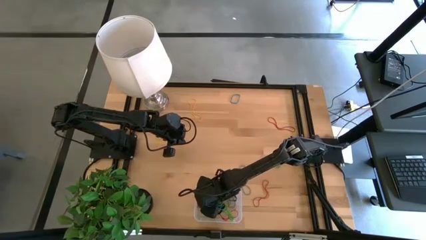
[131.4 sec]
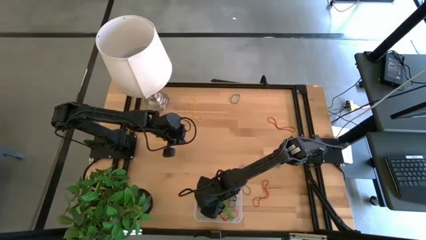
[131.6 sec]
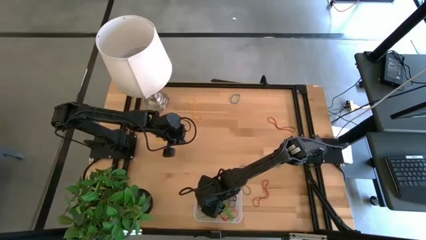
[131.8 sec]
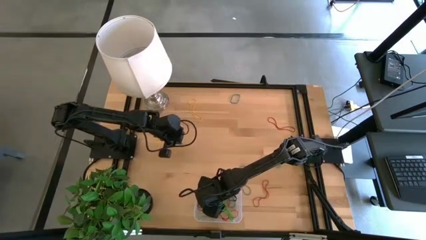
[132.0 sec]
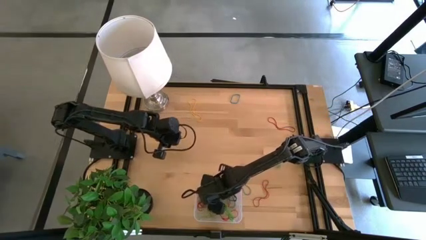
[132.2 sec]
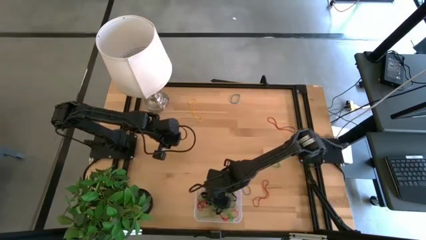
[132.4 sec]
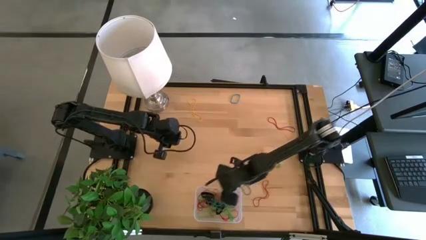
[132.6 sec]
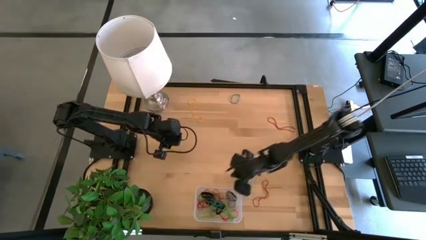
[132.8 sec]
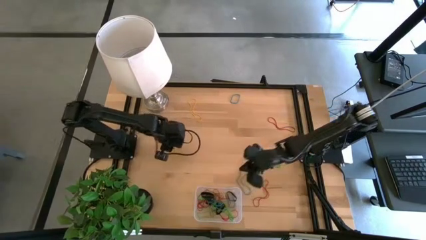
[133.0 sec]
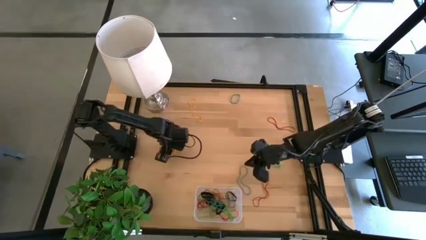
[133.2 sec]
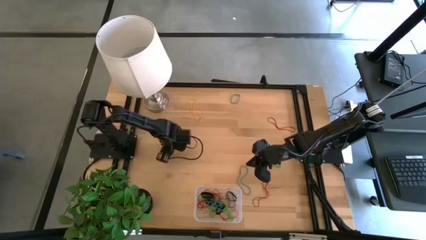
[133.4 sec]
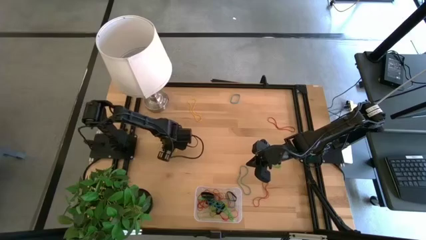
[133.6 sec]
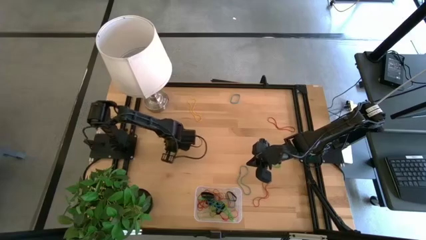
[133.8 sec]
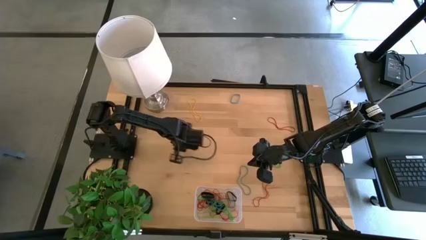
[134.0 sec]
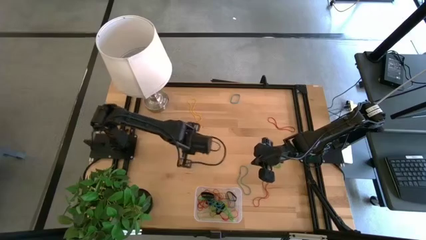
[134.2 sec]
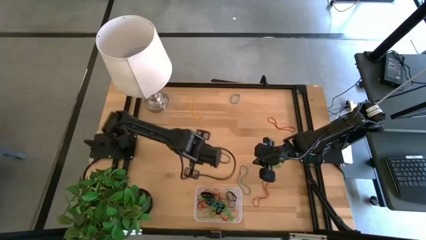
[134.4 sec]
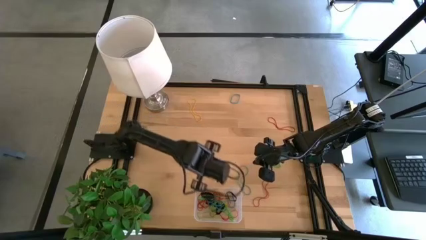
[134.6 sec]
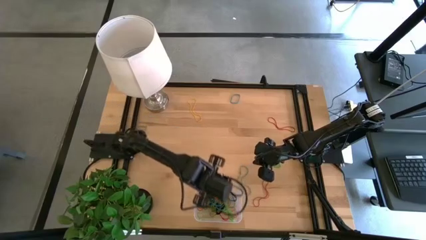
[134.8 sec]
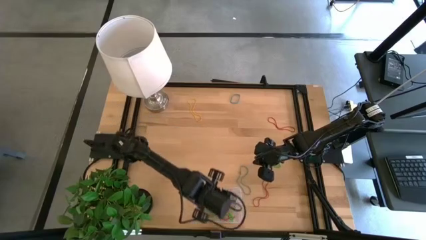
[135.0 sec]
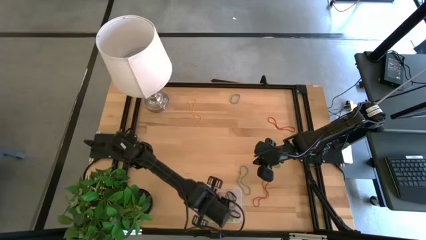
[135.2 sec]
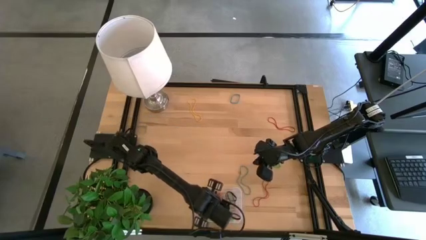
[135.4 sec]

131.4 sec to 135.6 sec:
Task: Pick and place rubber bands into bin
Put the yellow rubber band into the transparent bin

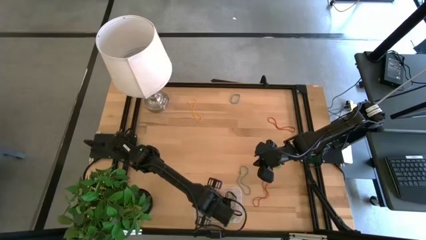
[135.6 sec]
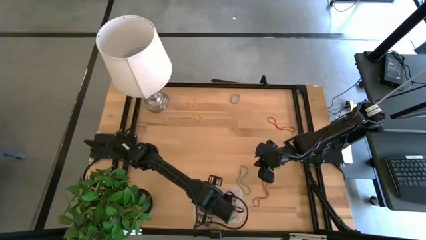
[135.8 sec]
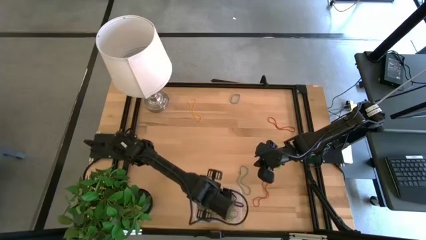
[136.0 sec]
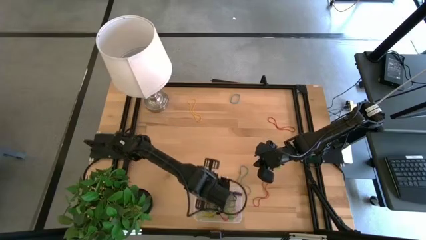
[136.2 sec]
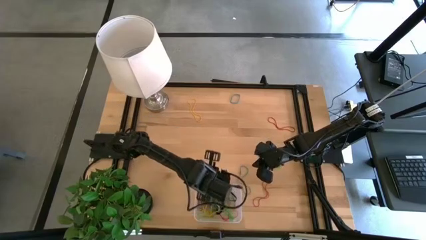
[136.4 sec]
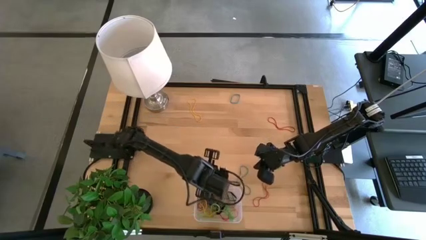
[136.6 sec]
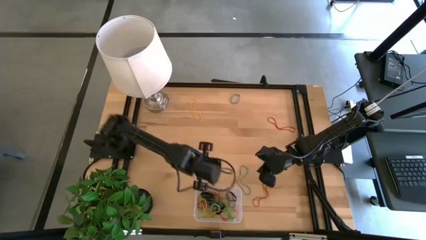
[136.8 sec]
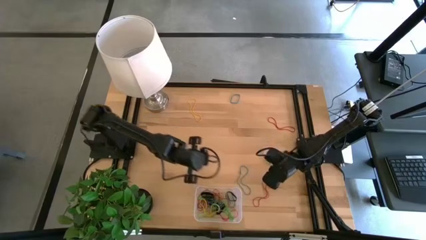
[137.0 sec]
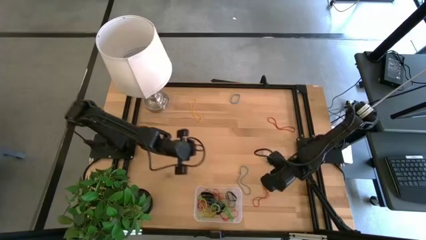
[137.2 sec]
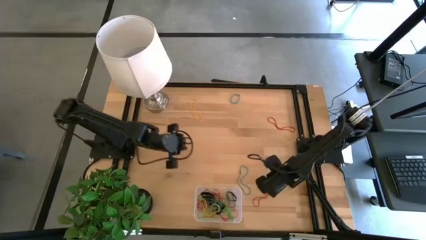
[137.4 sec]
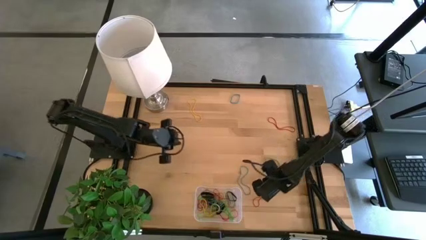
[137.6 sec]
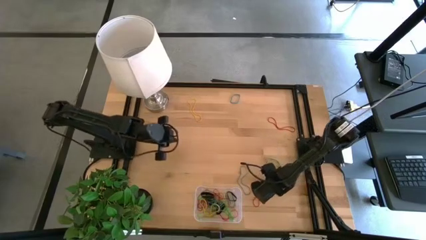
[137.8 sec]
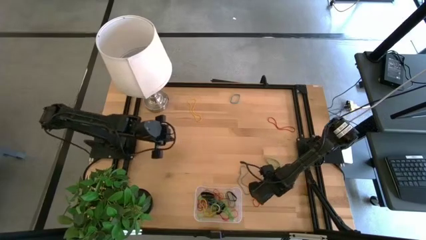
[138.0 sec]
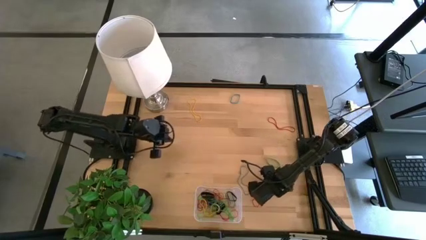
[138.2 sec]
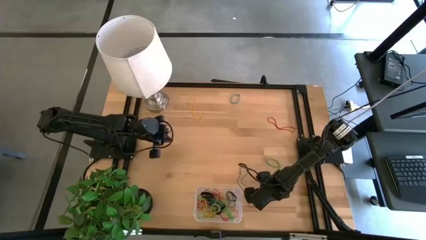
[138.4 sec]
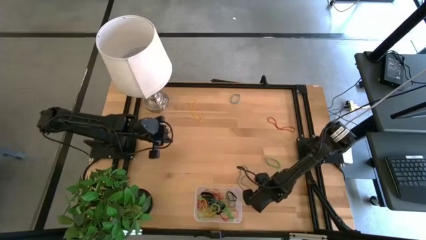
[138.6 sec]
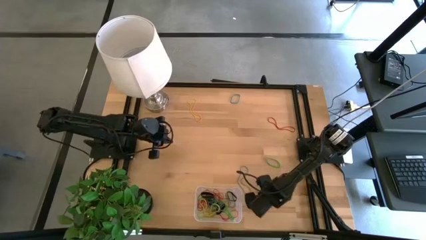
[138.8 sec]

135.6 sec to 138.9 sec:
Put the red rubber band into the transparent bin

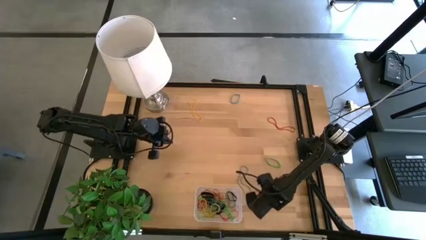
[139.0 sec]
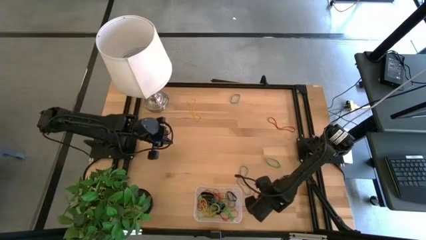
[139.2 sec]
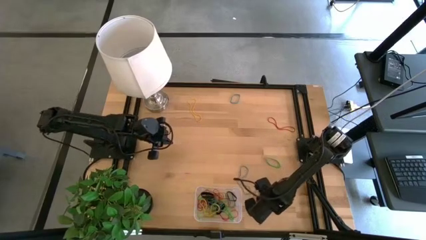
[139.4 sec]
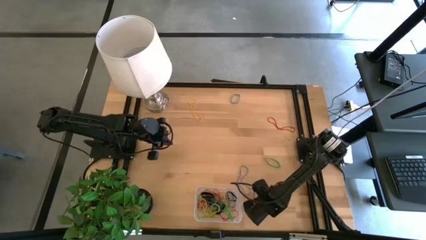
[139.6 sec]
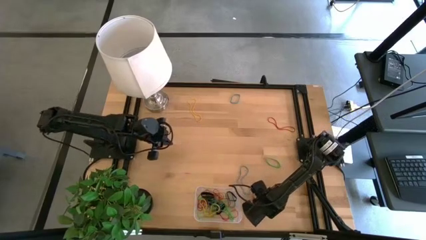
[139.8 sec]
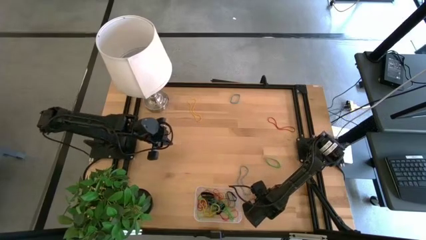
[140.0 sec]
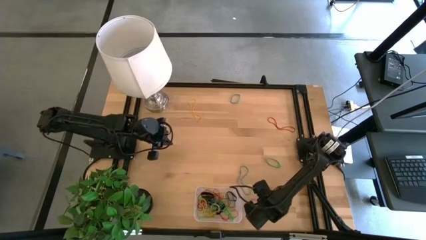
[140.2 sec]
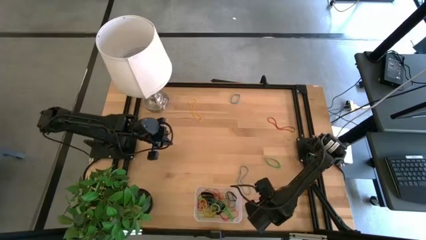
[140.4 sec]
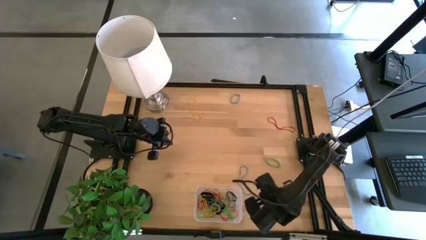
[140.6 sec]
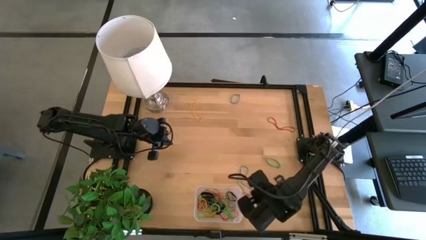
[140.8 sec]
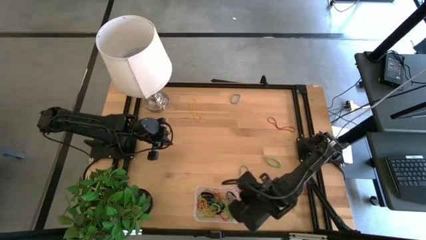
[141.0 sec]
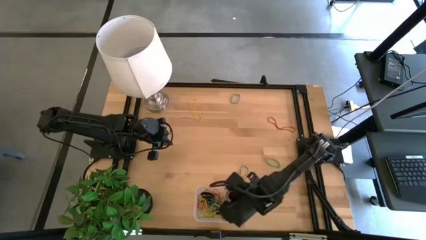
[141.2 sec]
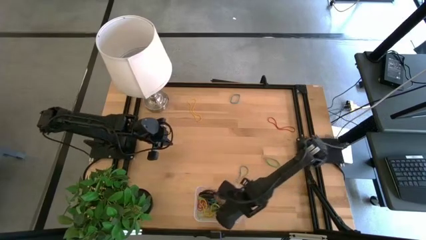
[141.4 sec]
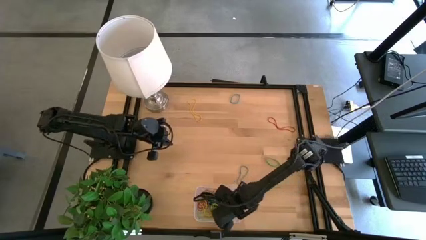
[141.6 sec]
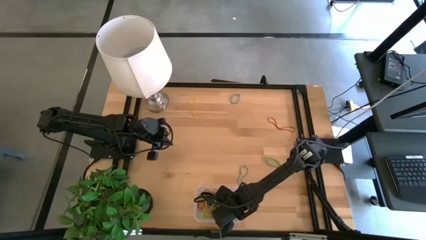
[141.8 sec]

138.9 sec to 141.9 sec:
Put the red rubber band into the transparent bin

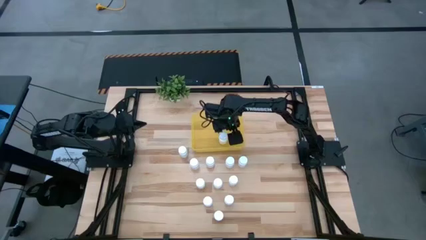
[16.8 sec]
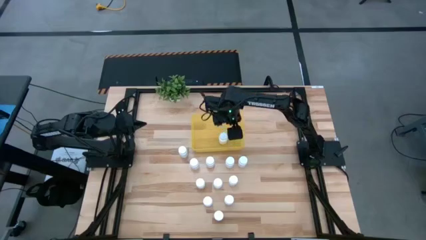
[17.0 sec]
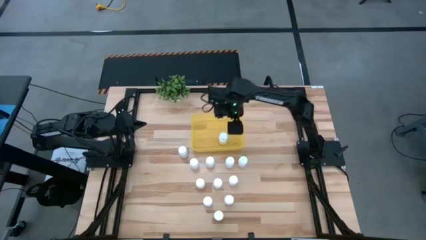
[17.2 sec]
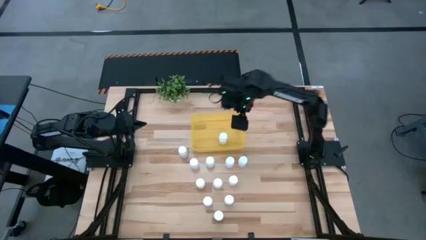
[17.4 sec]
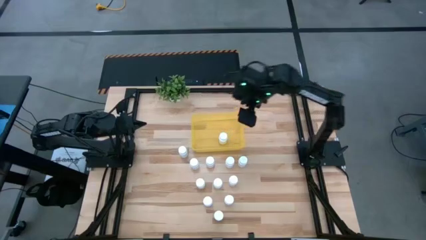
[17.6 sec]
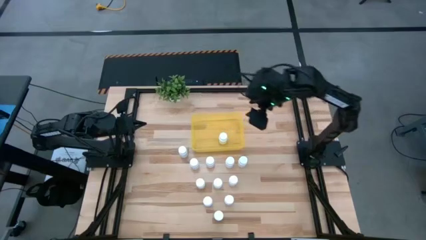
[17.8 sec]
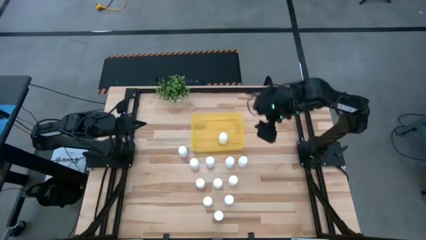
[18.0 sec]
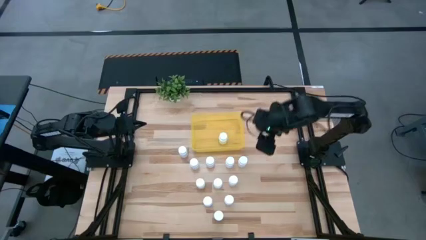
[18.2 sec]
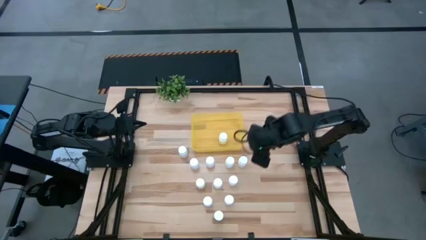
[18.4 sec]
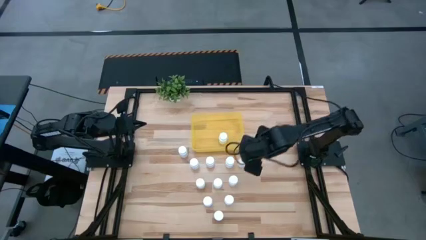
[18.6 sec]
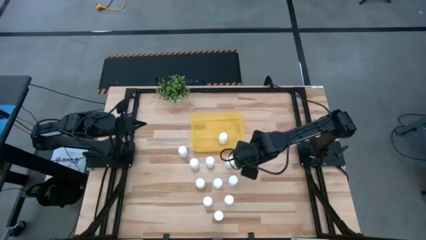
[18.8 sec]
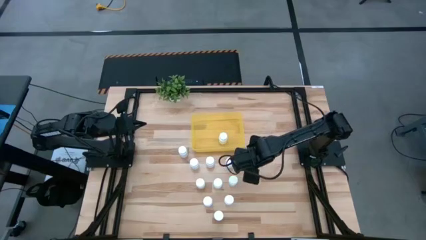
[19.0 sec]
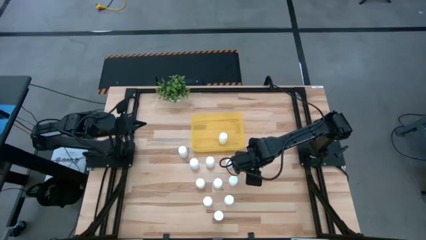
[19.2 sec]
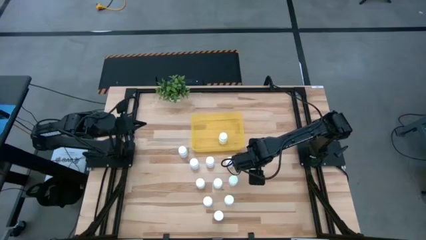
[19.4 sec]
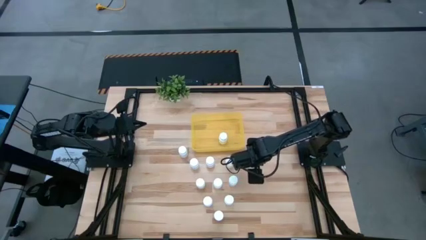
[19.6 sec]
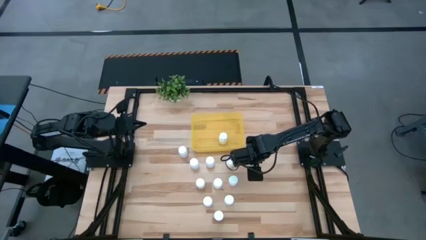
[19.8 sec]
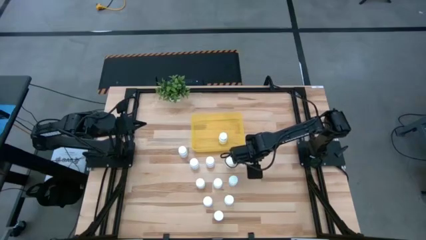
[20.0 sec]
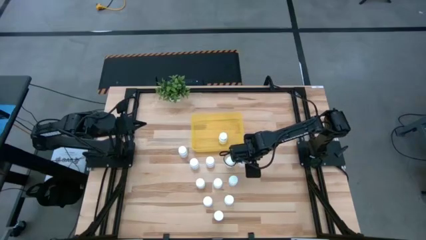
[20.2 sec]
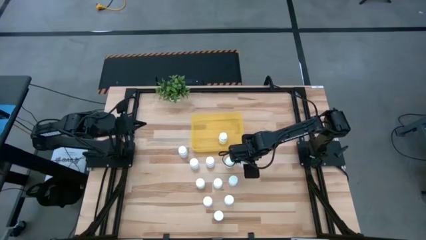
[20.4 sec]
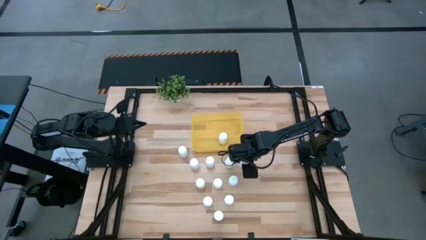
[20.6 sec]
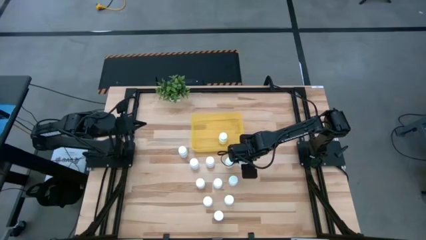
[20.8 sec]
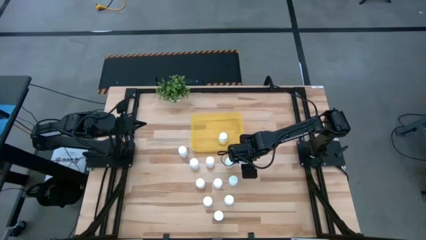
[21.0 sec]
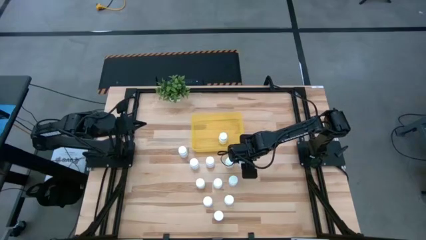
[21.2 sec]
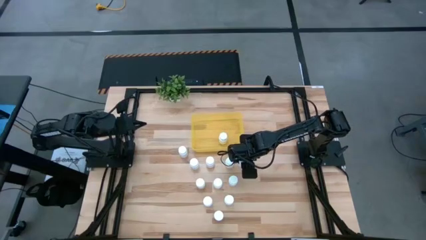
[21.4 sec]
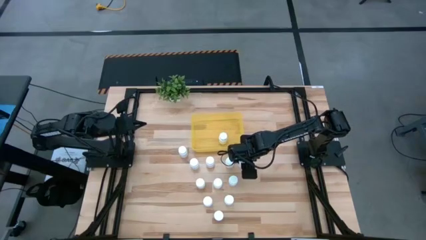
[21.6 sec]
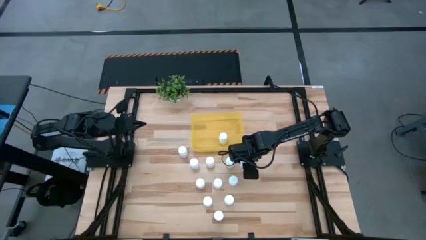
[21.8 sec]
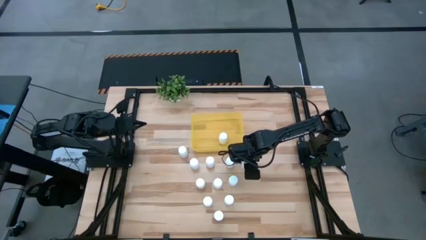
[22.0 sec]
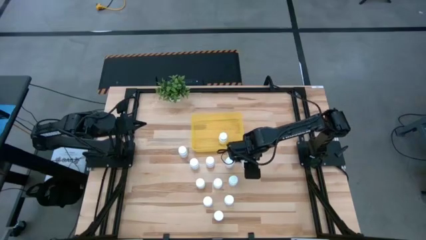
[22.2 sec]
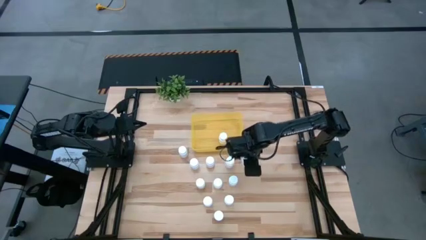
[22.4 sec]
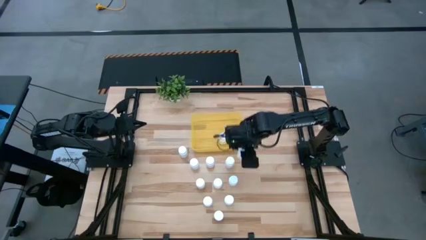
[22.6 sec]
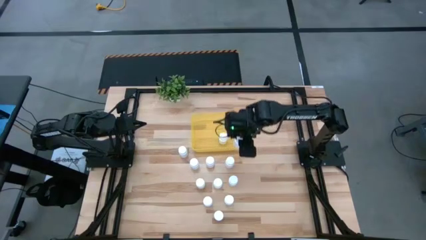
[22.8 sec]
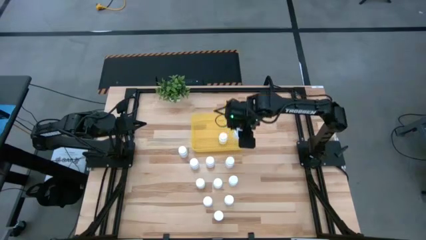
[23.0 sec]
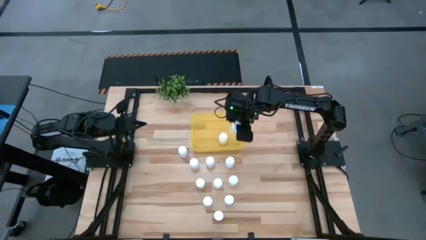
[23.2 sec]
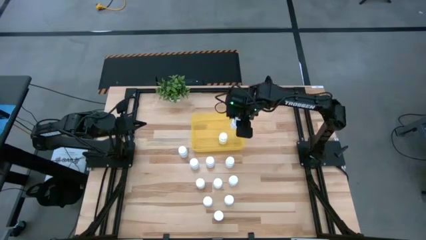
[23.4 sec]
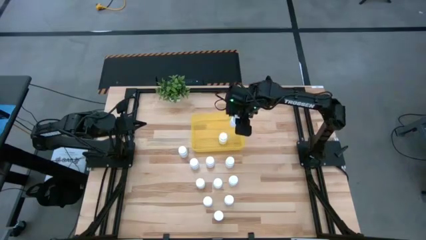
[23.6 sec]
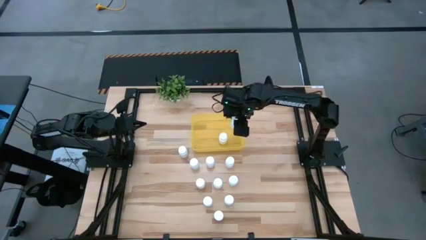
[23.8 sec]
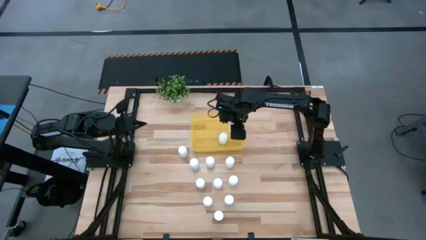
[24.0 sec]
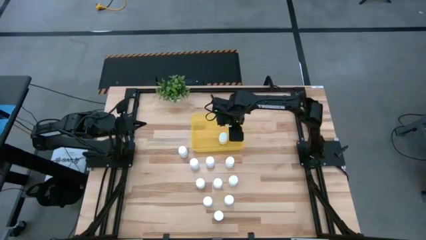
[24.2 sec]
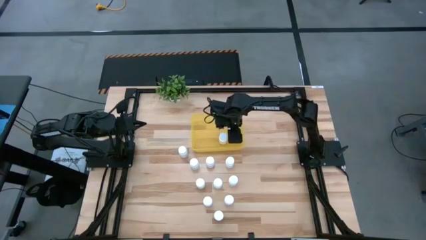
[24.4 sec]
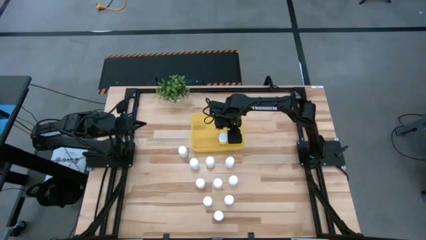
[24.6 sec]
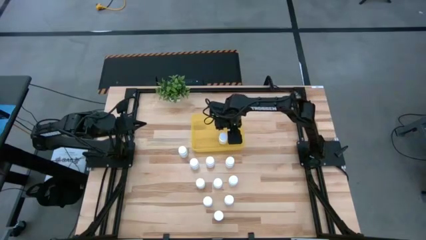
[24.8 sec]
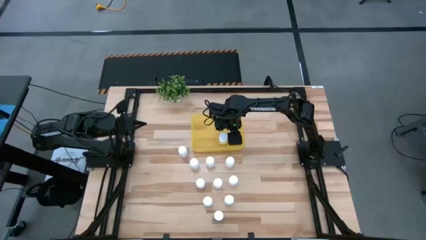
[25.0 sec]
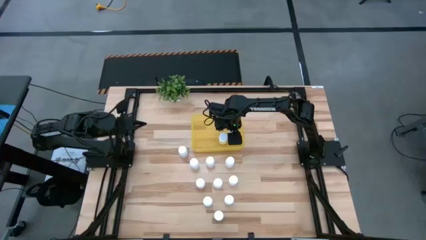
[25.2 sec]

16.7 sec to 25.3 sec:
Task: Pick and place pill bottles into a basket
Put the white medicine bottle into the yellow bin
